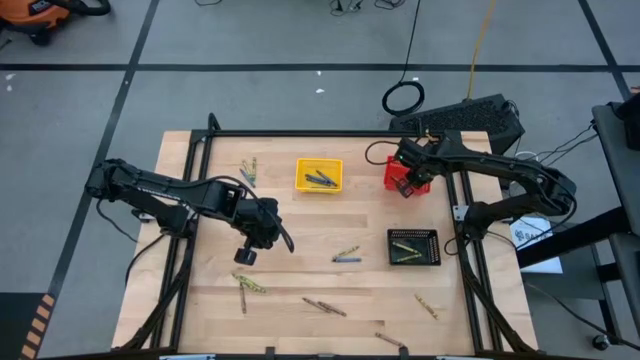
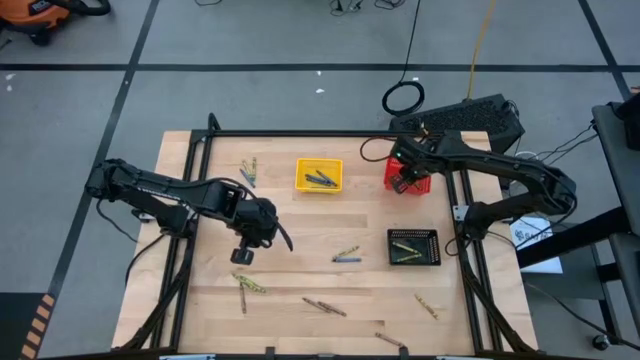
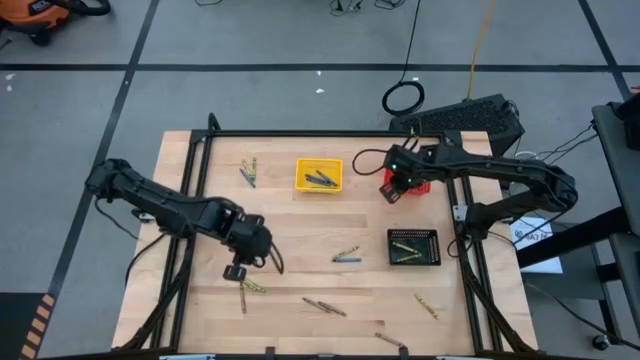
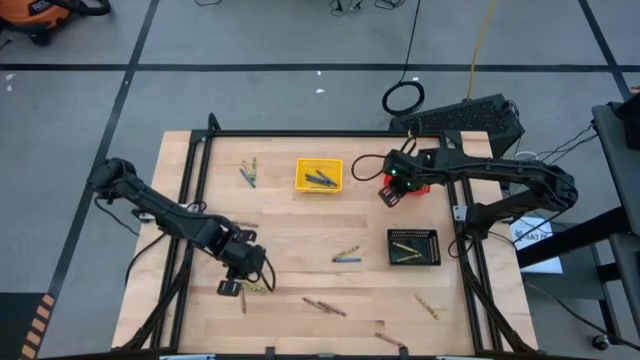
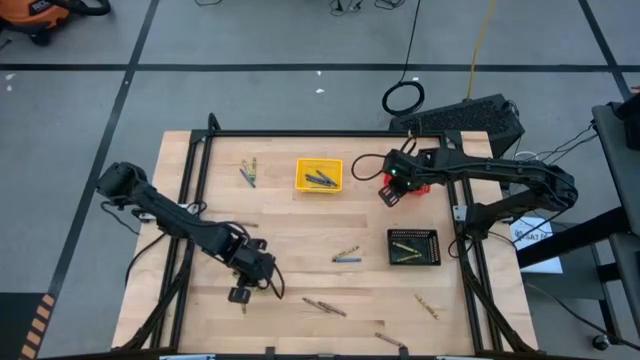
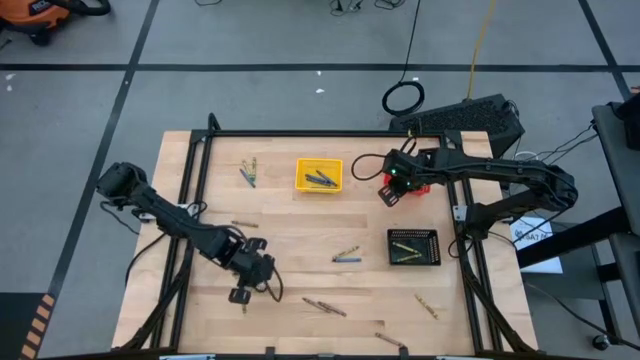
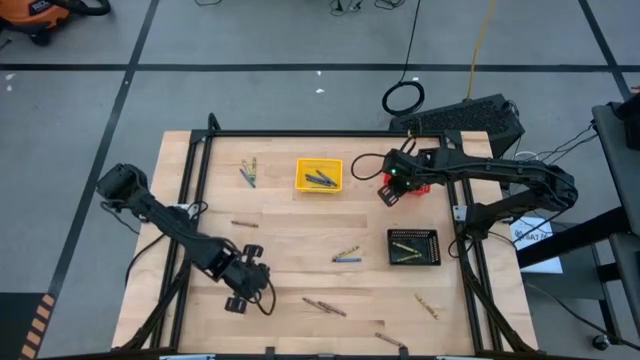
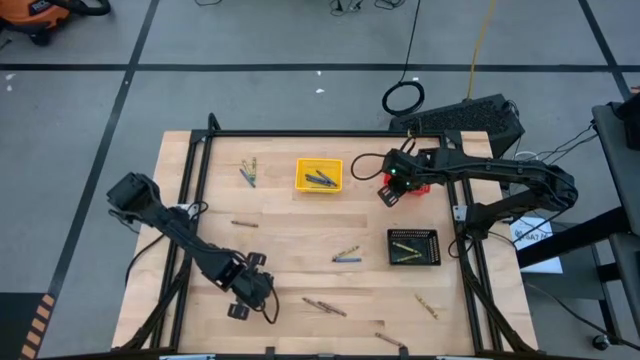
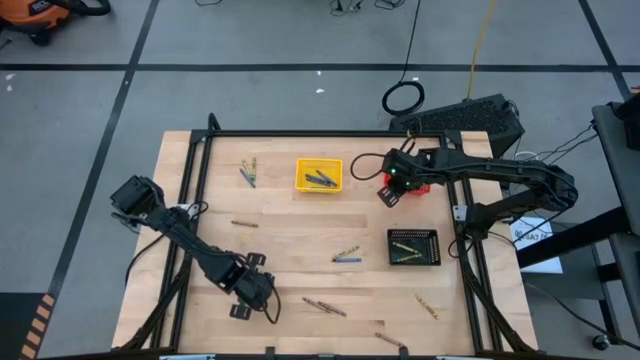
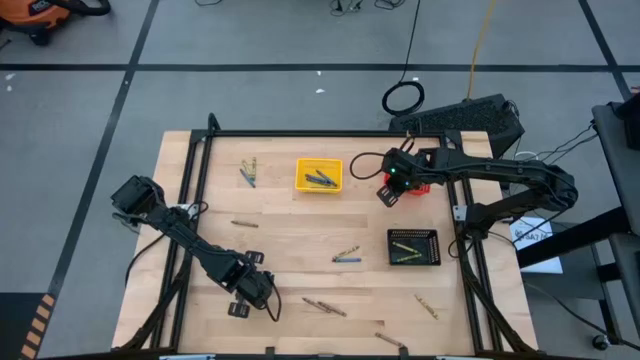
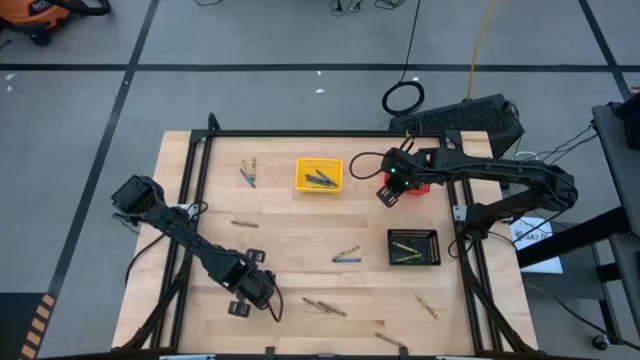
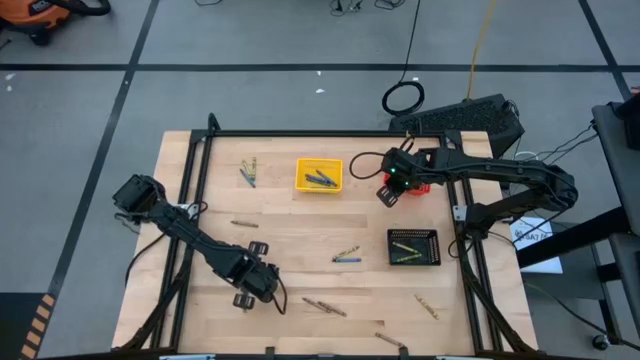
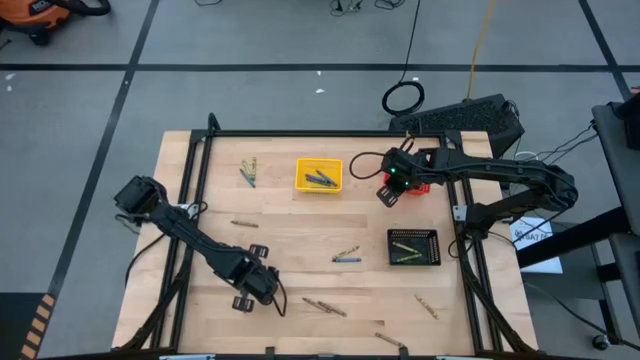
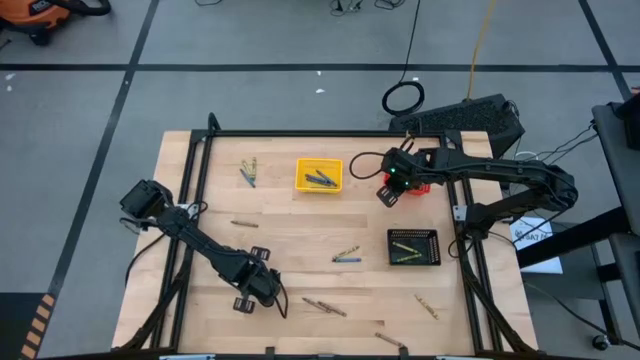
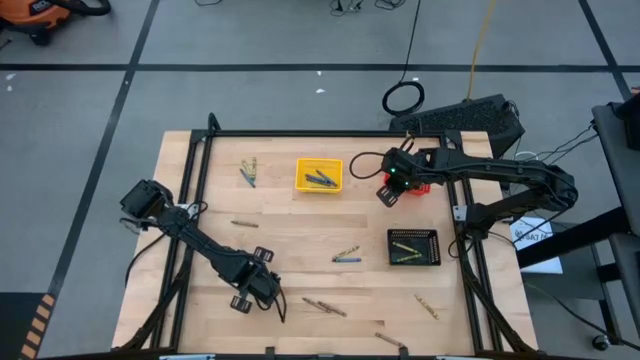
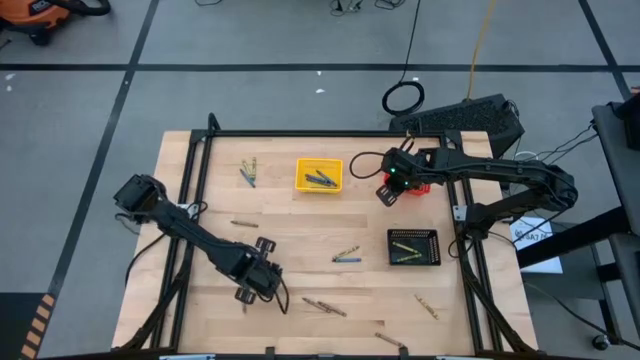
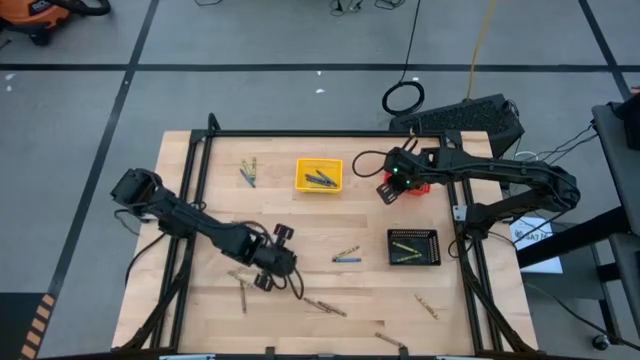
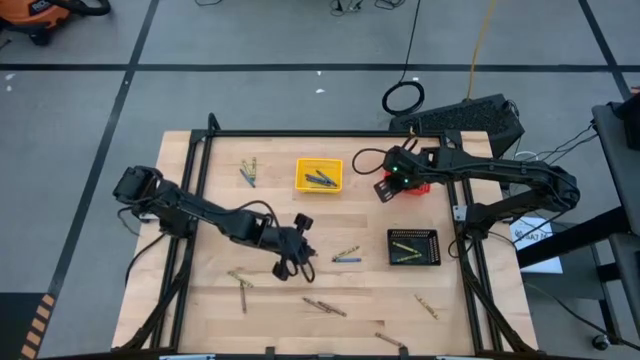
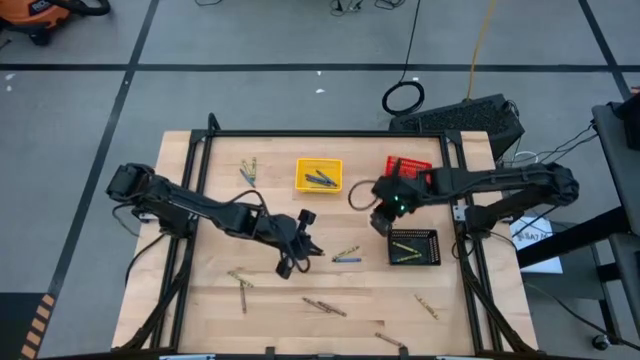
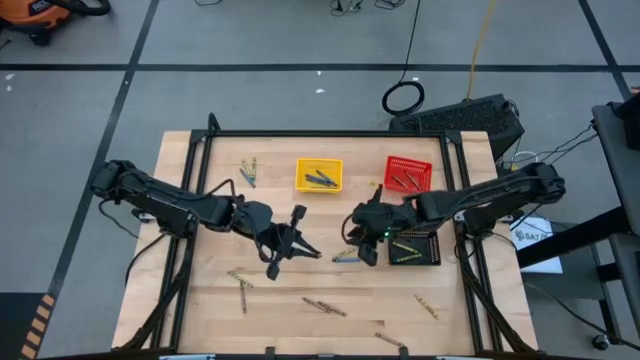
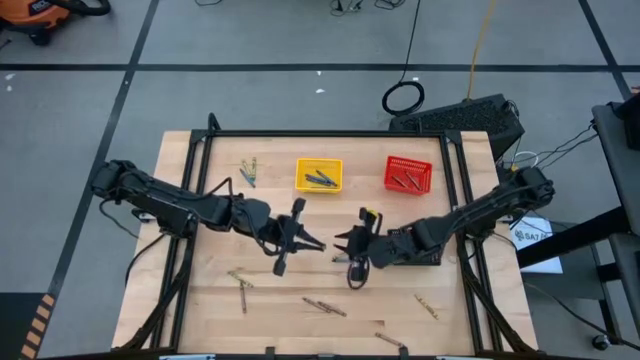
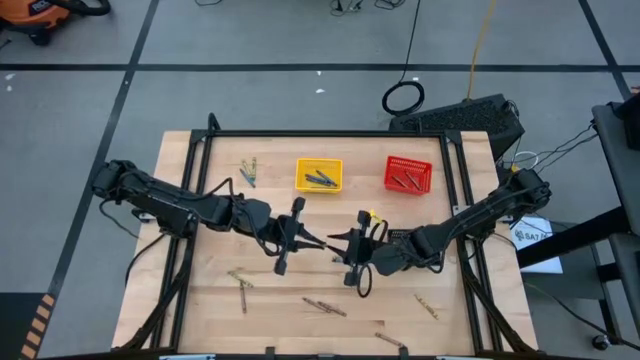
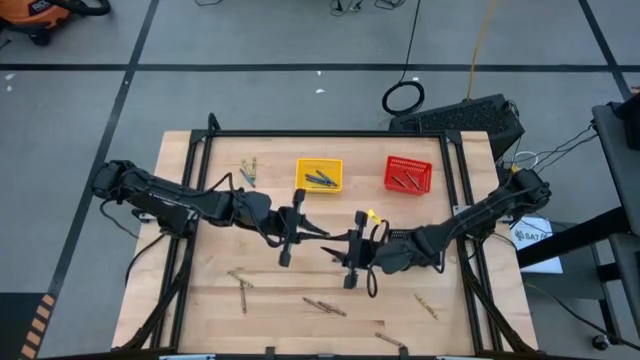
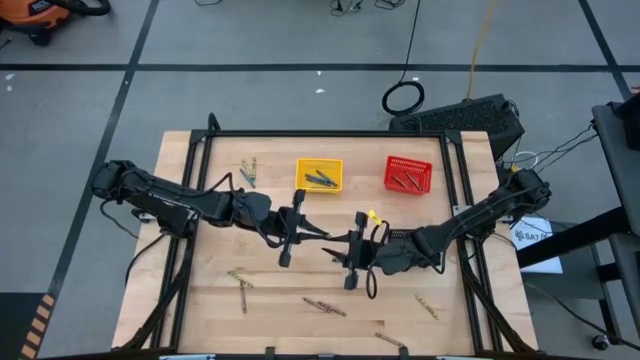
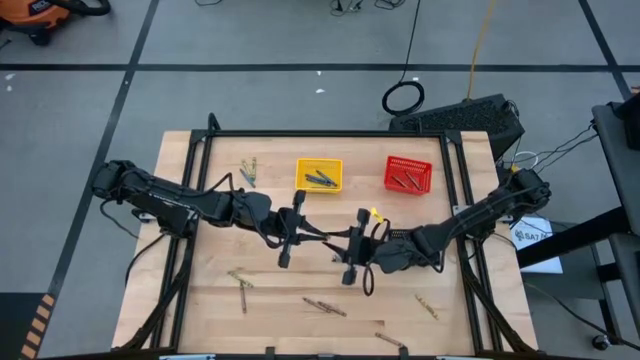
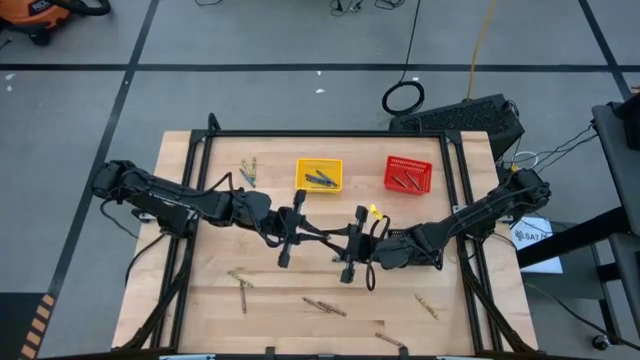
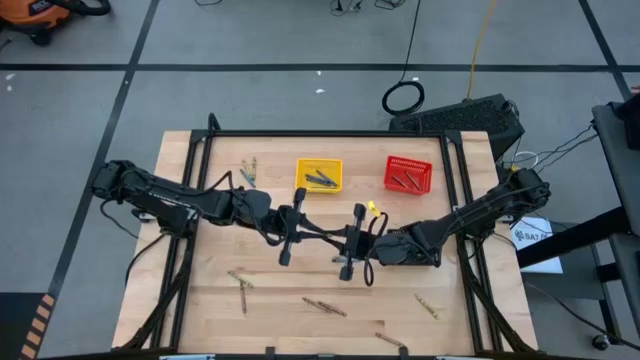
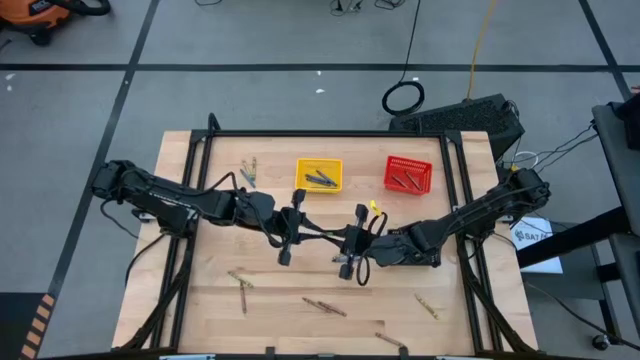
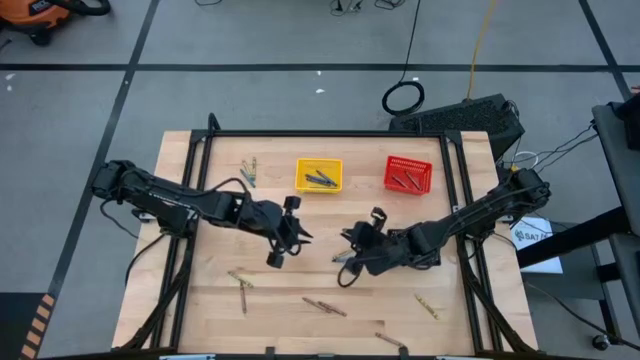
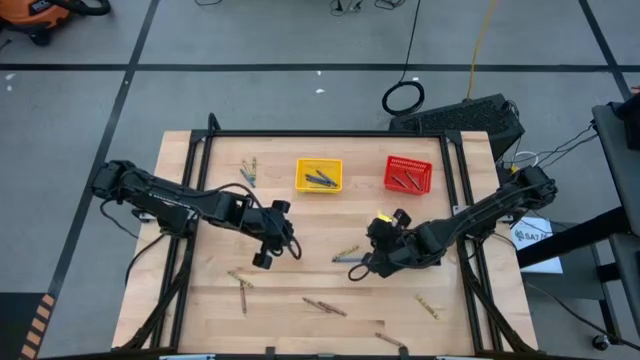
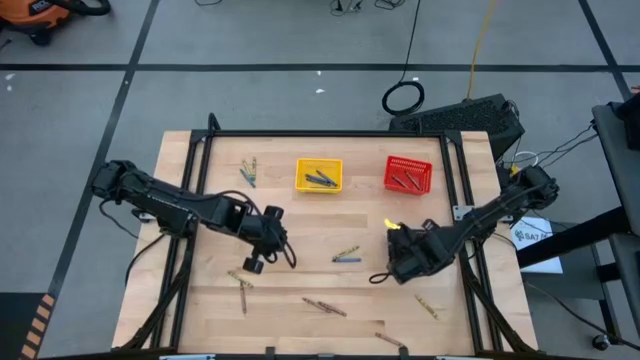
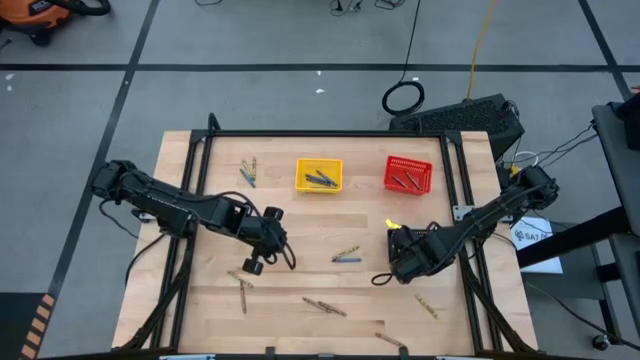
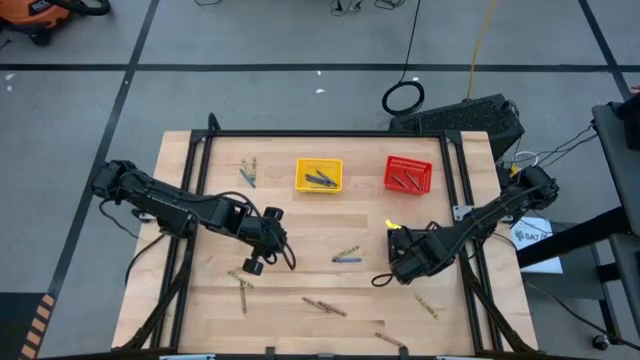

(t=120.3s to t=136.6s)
Task: Sort crayons
Put the green crayon into the black bin

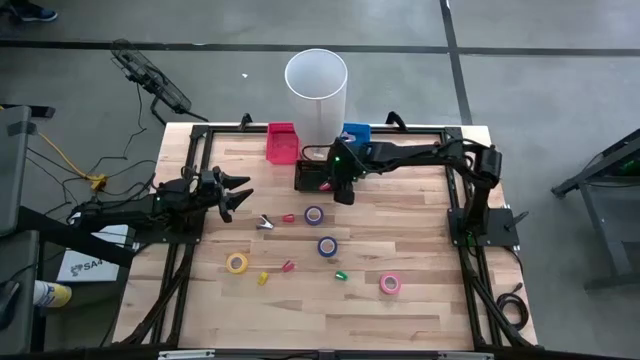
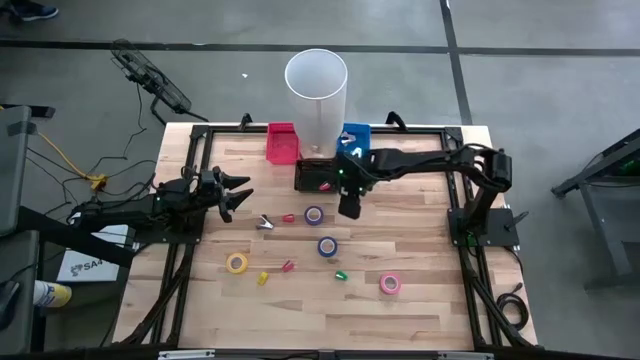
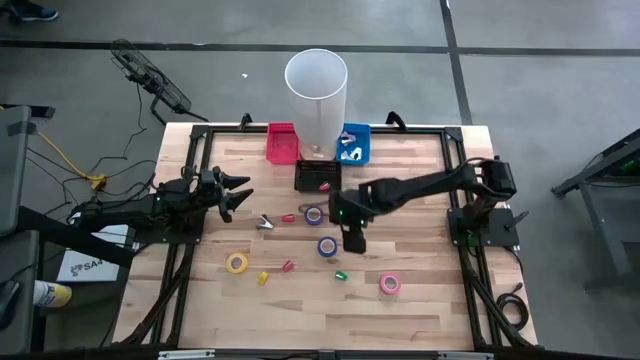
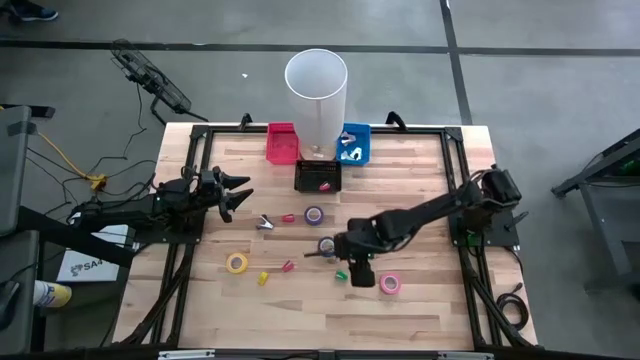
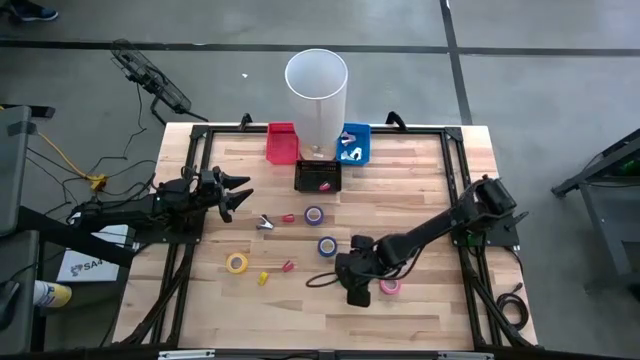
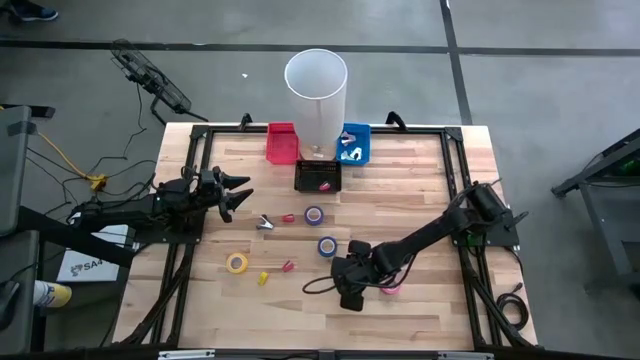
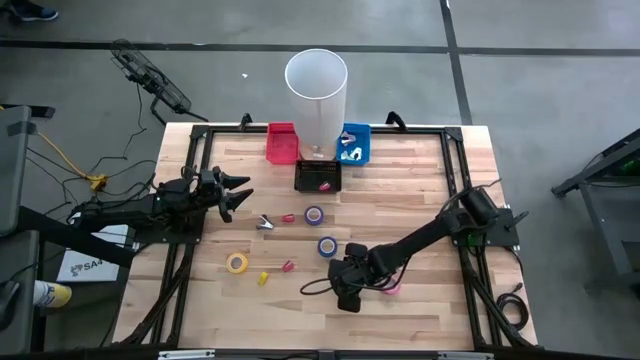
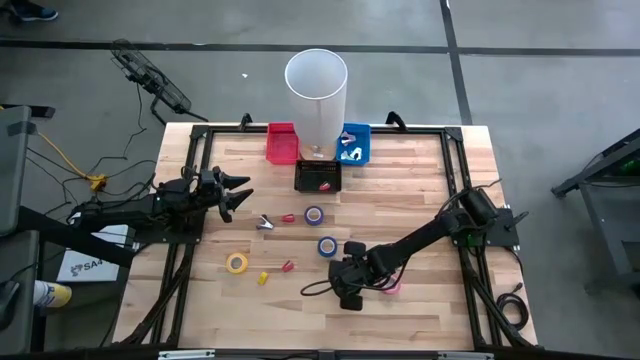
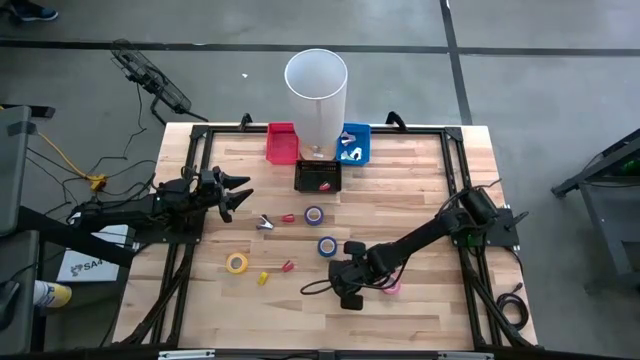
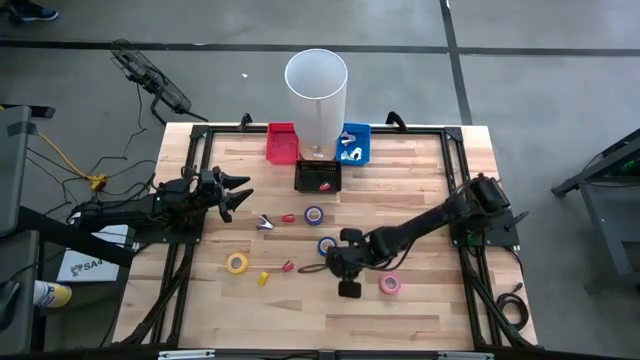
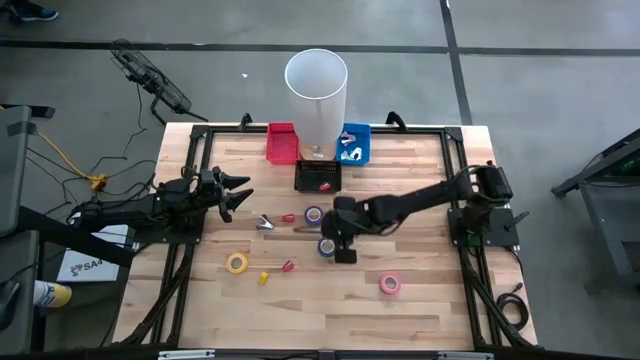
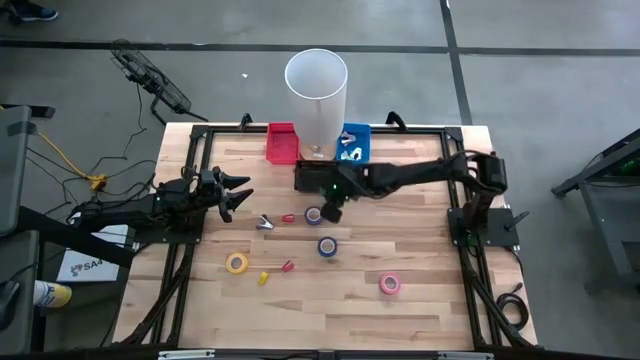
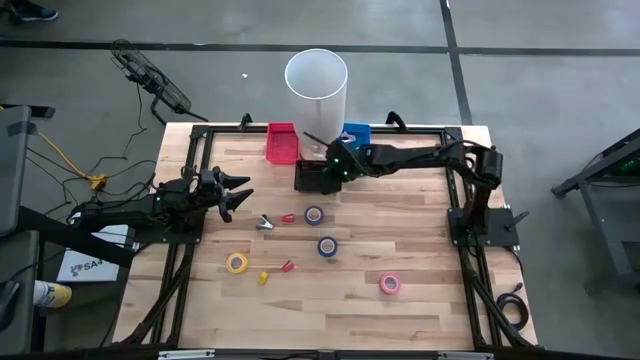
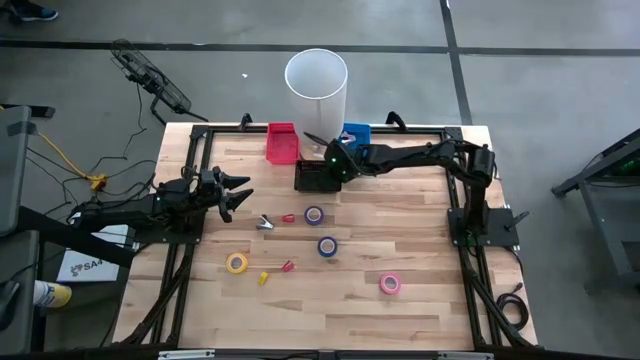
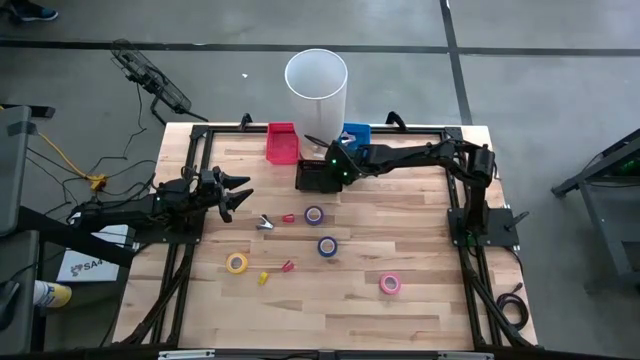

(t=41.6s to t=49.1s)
Task: Pick and place Stapler, Stapler remover, tape
Put the green mini stapler into the black bin
